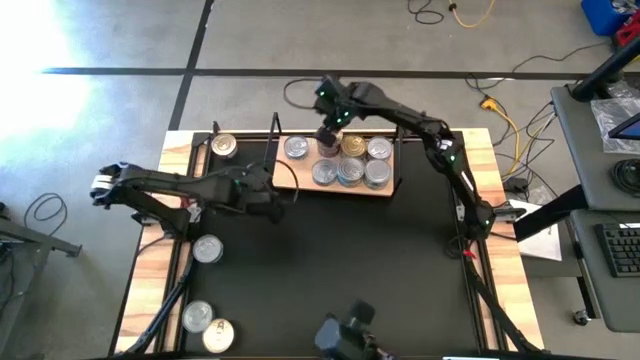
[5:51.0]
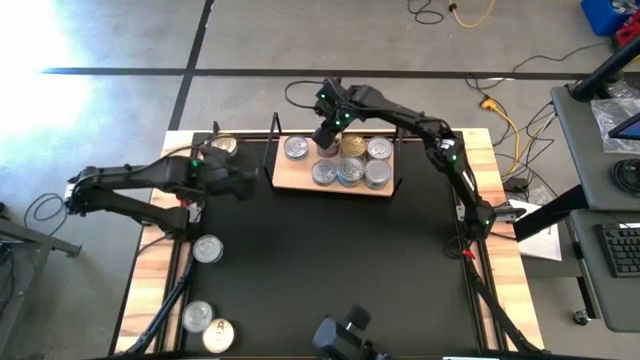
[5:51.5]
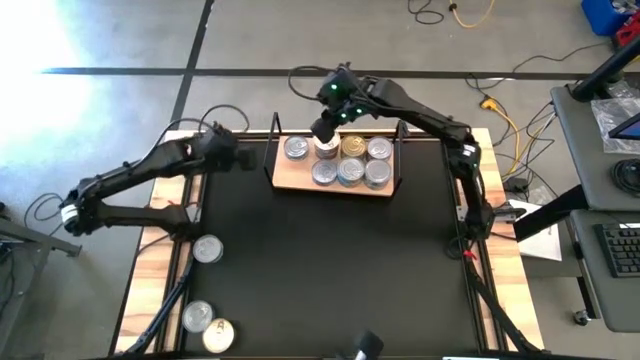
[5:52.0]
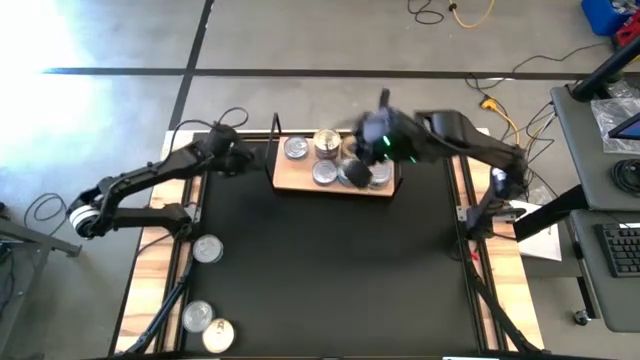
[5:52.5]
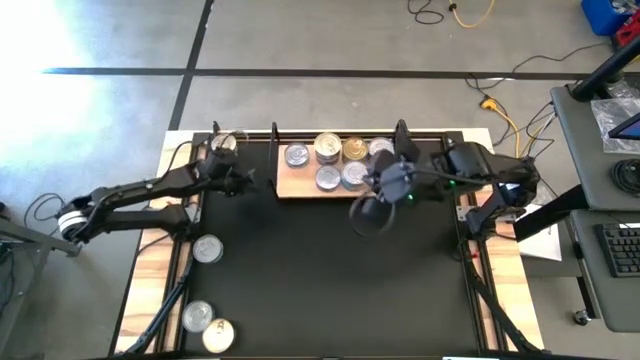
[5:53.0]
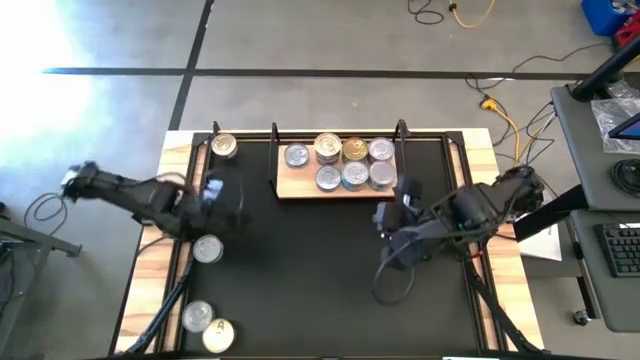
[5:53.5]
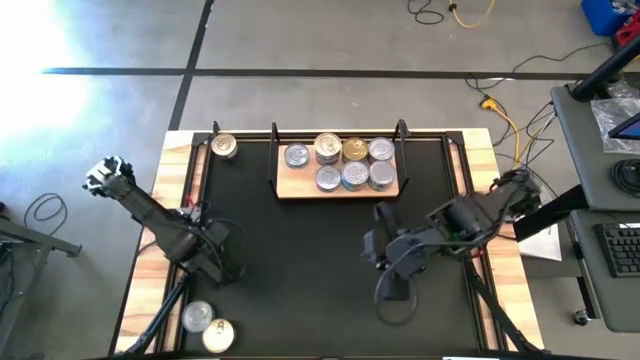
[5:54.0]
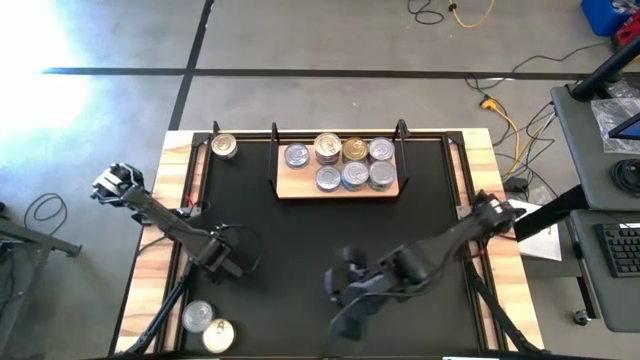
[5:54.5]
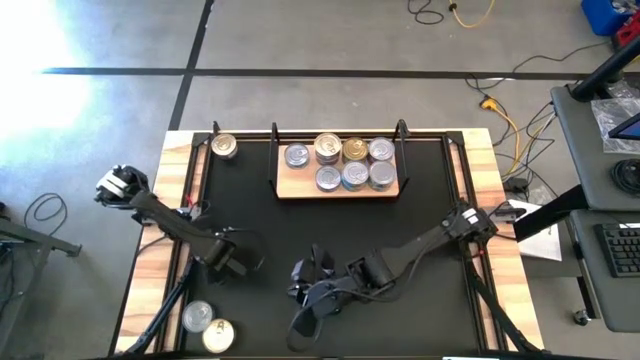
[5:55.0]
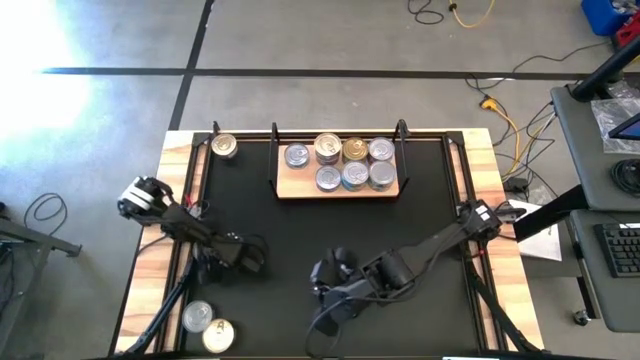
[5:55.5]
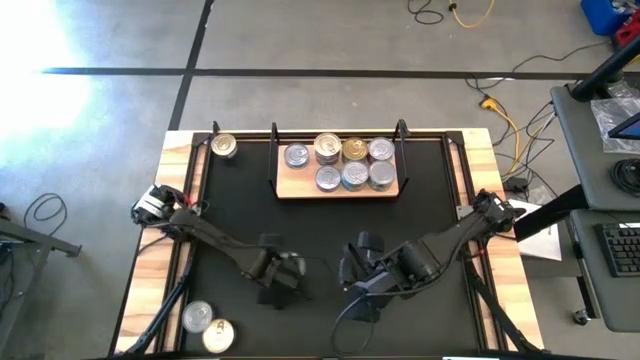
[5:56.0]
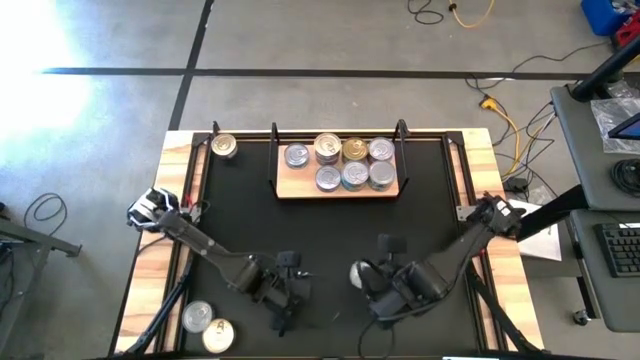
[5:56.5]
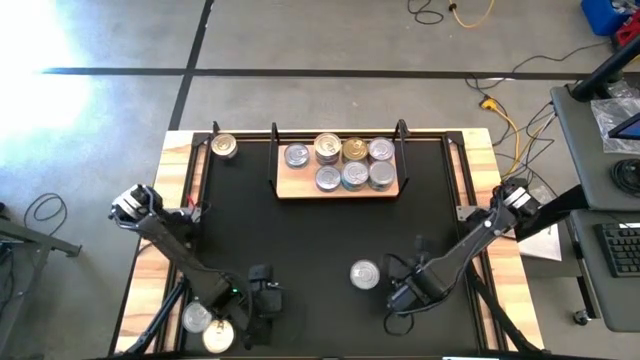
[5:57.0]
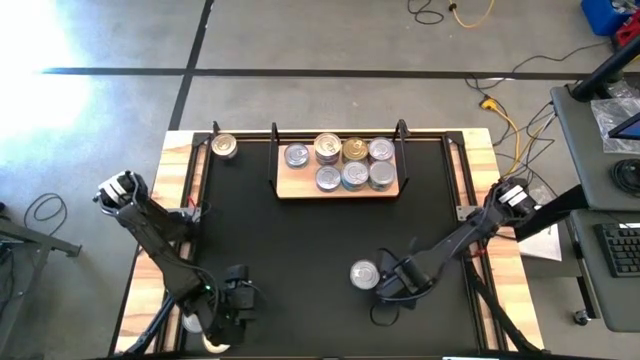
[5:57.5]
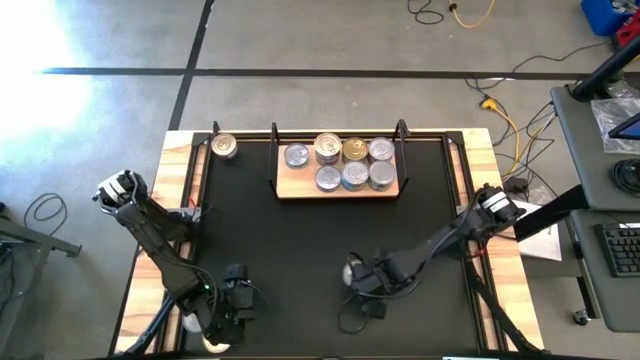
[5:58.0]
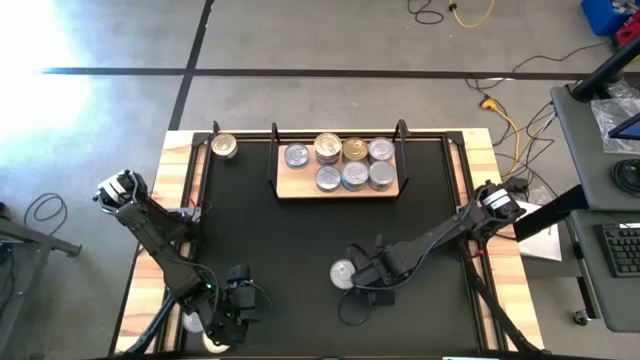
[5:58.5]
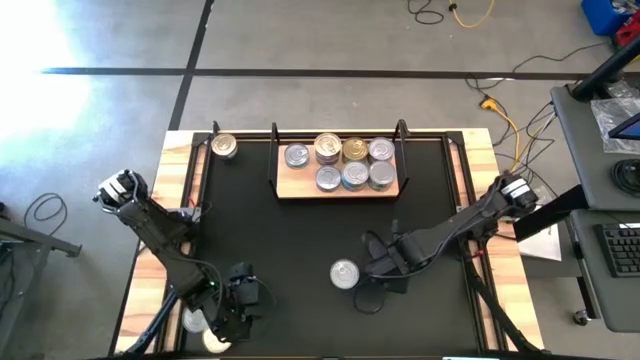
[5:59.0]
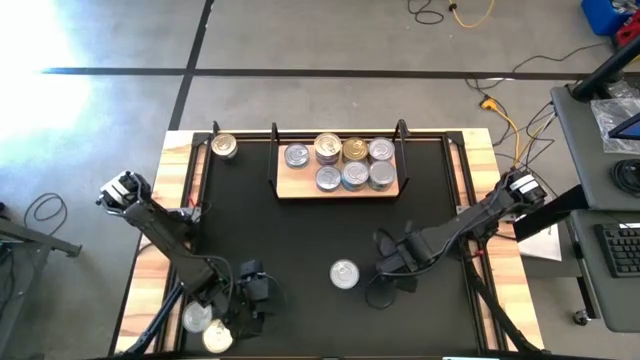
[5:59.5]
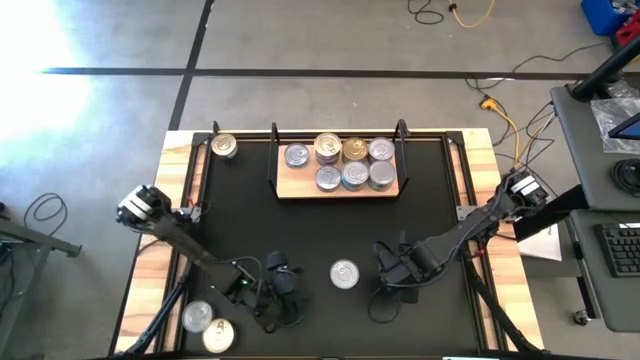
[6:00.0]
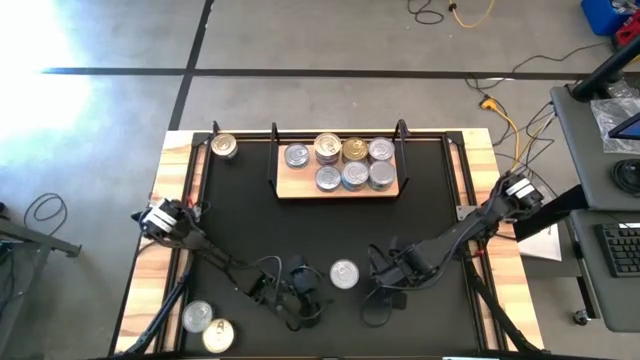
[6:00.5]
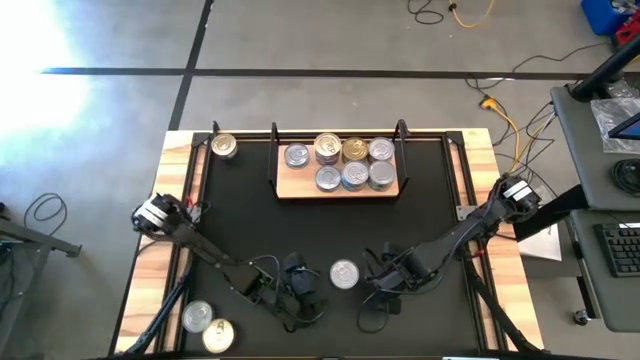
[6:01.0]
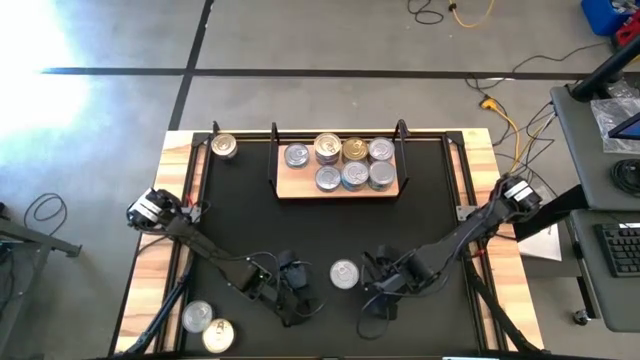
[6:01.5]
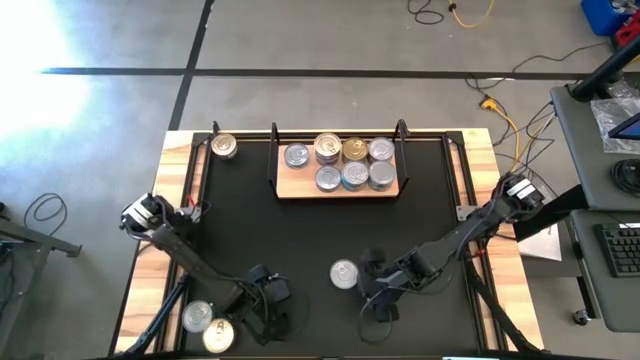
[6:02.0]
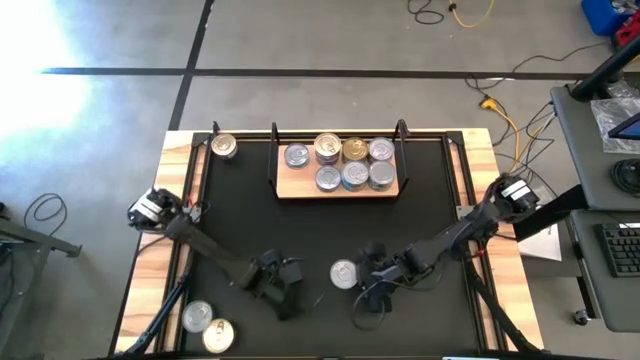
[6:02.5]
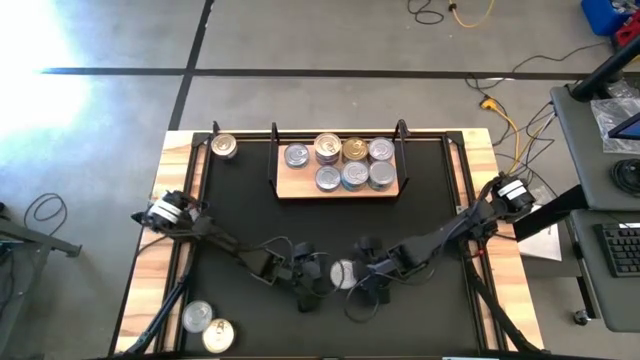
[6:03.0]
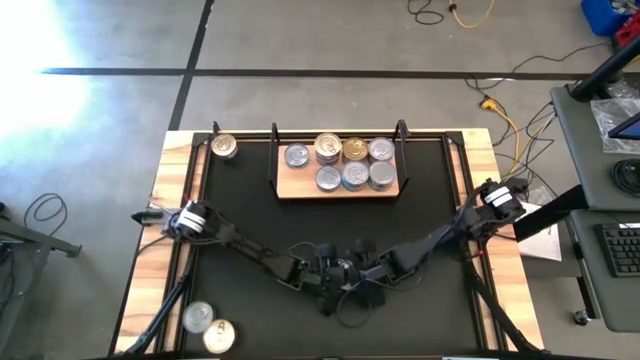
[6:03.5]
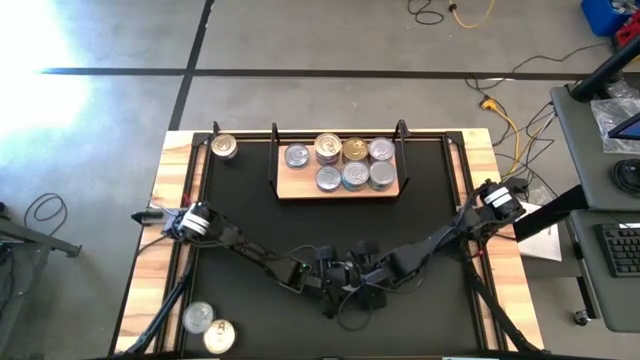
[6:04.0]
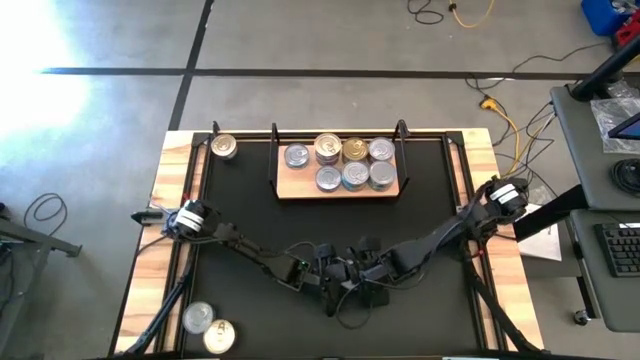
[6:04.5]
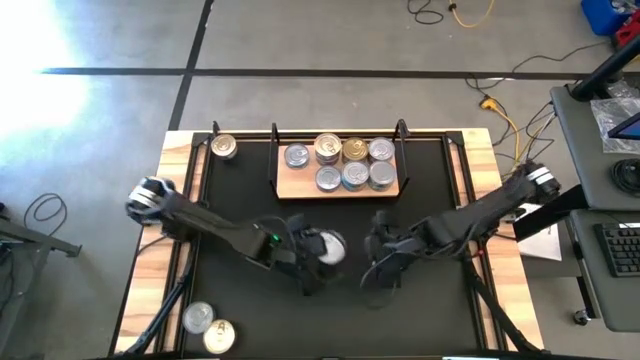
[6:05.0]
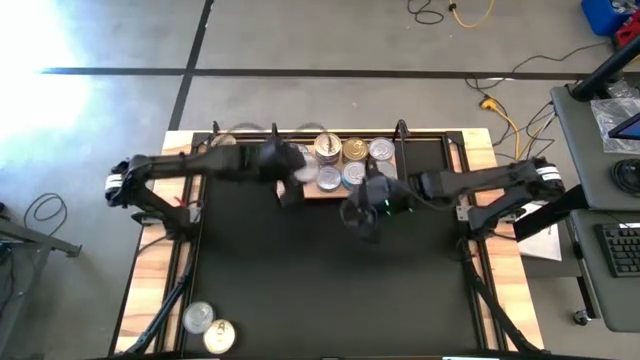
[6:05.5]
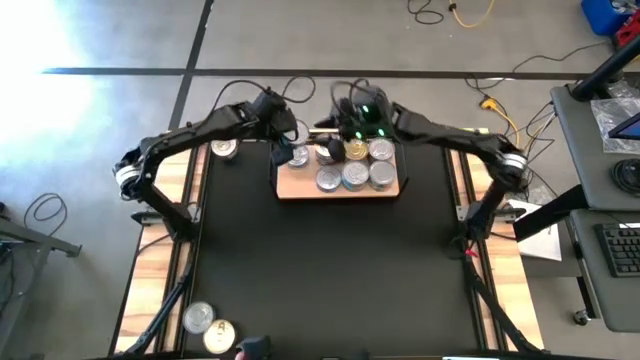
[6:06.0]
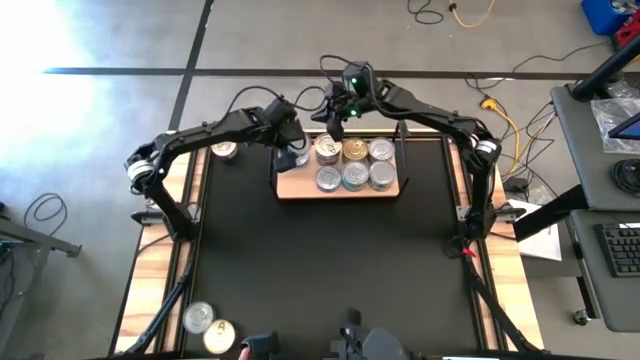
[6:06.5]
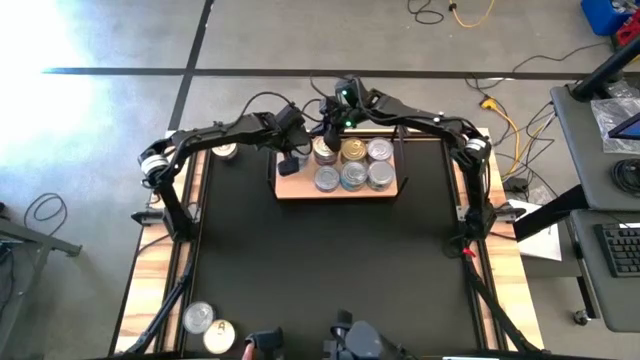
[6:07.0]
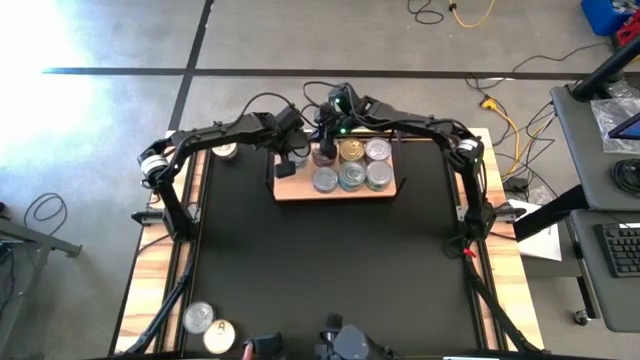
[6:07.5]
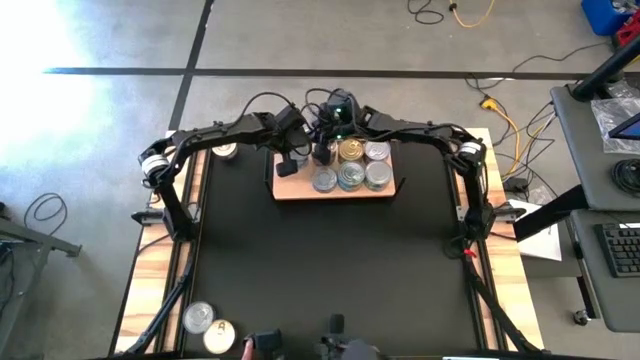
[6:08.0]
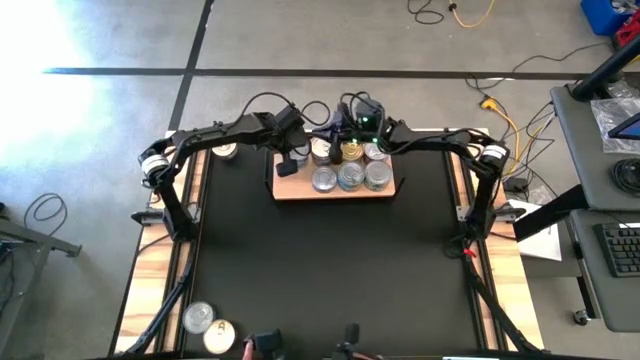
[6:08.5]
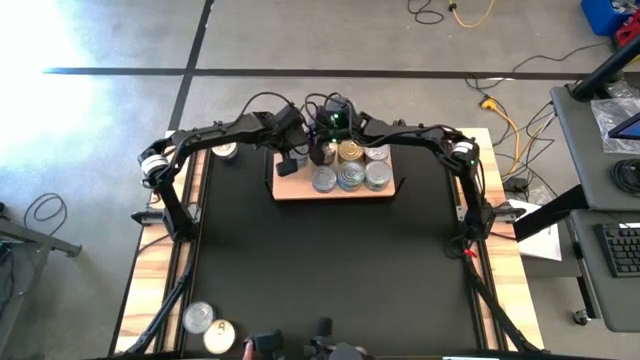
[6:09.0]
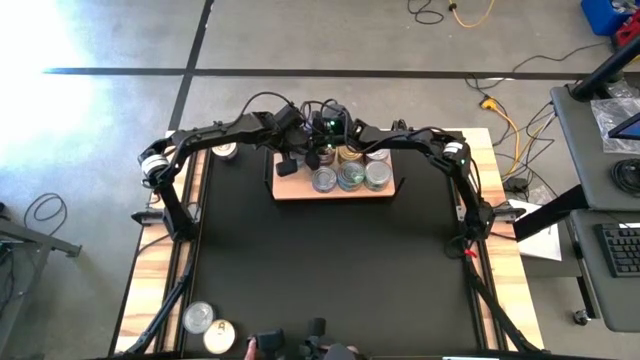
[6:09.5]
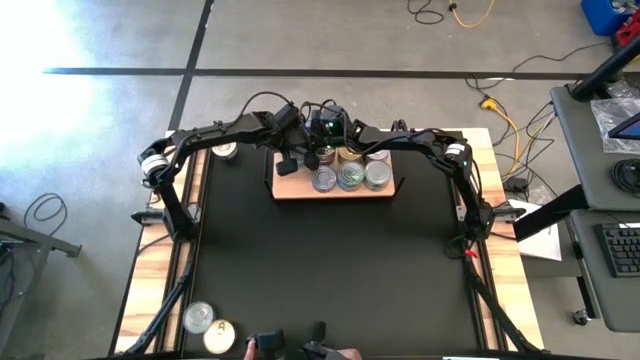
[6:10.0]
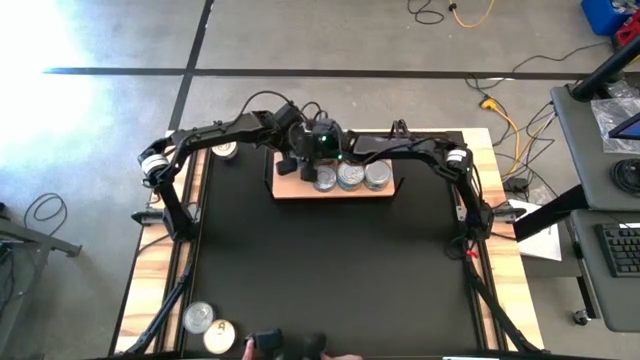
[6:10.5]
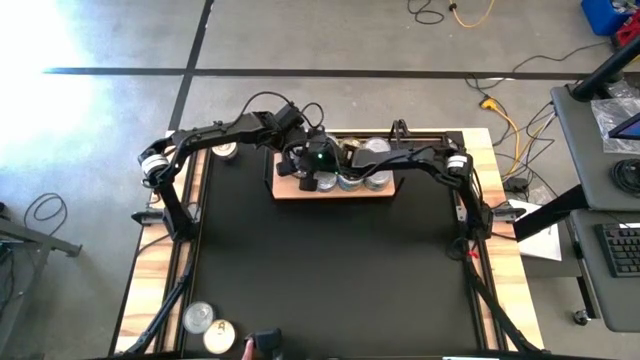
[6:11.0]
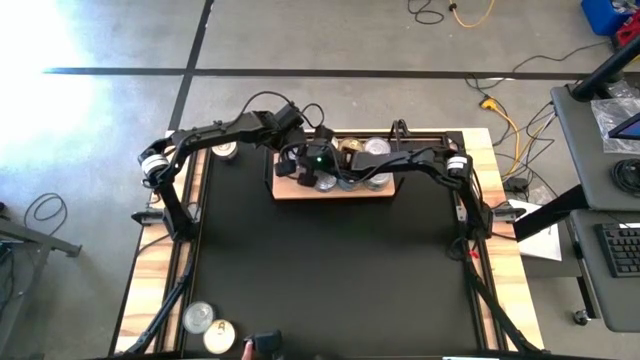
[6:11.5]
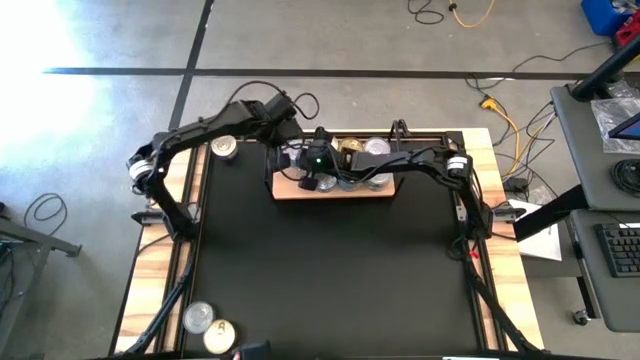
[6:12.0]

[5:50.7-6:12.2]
Task: Stack canned seafood by type on shelf
Stack the green-blue tuna can on top of the other green-blue tuna can on the shelf
